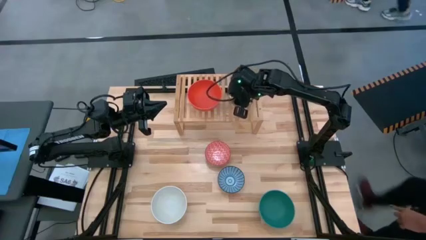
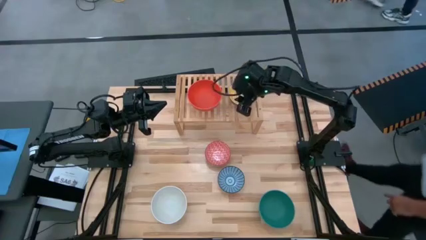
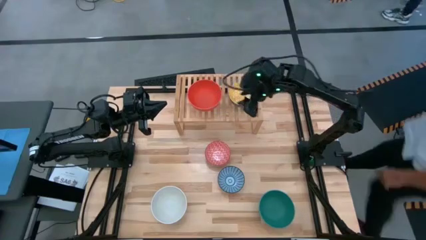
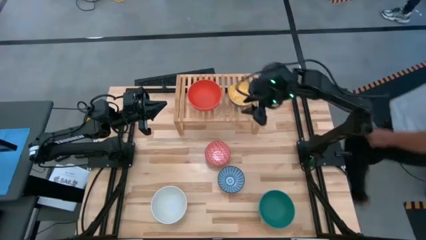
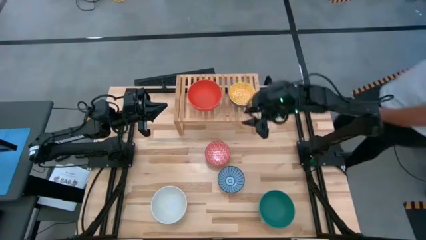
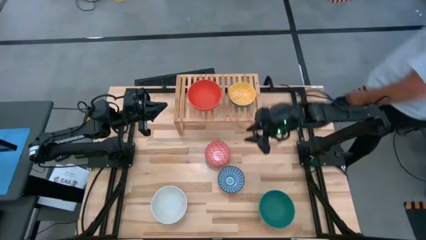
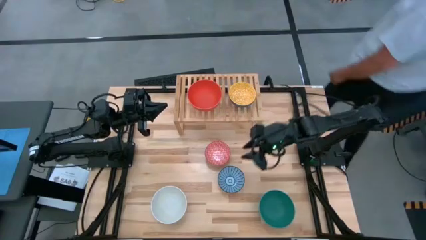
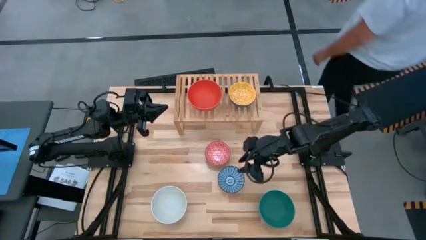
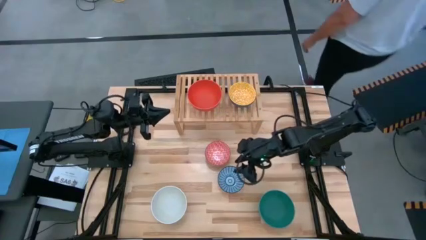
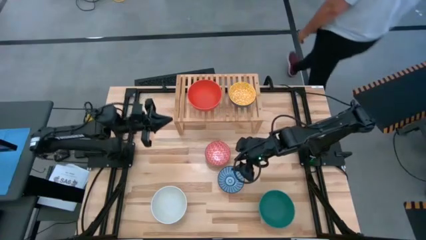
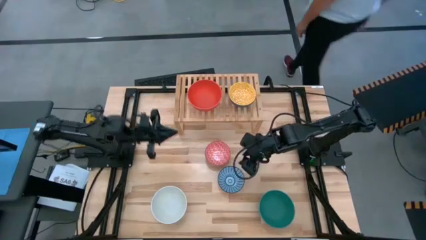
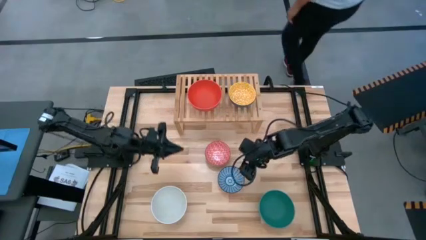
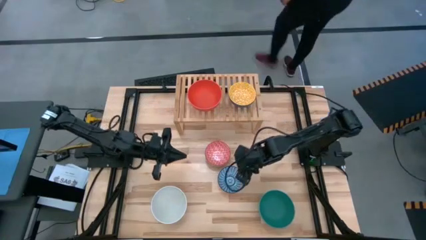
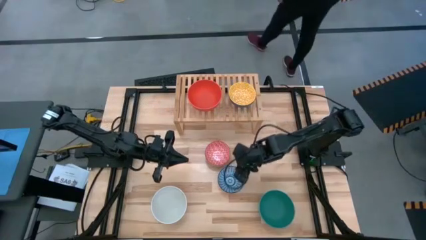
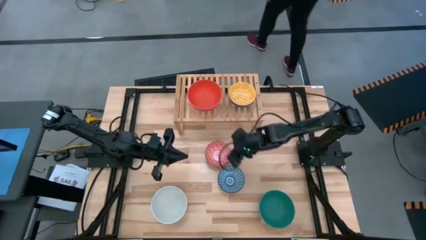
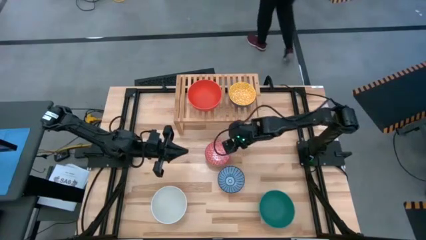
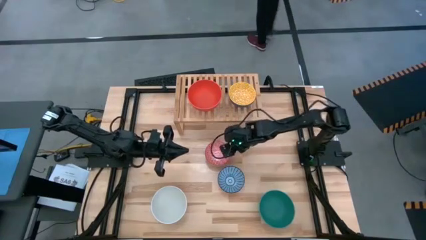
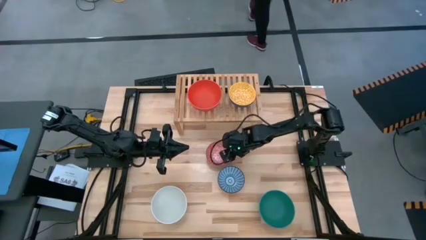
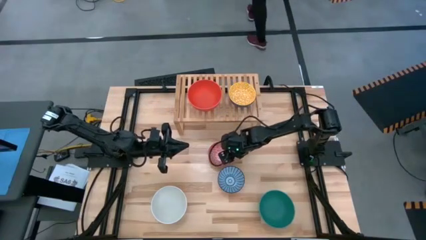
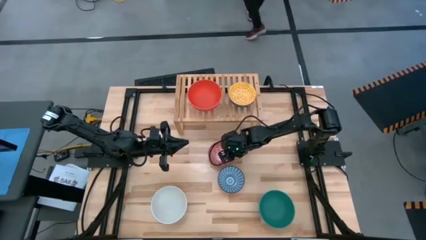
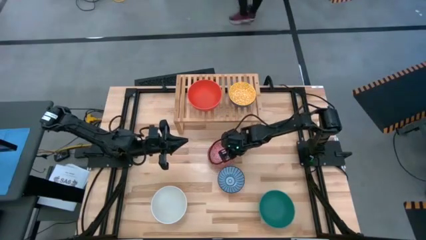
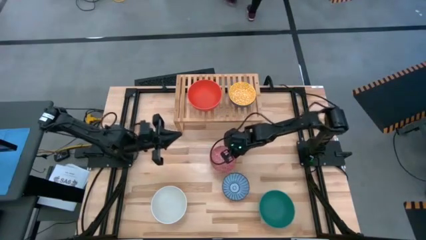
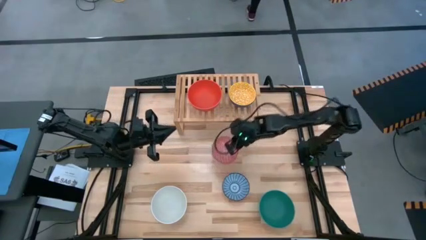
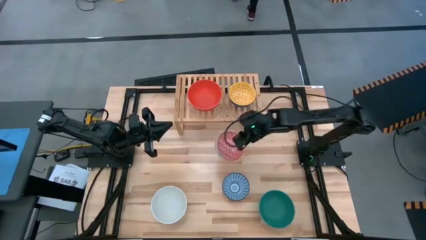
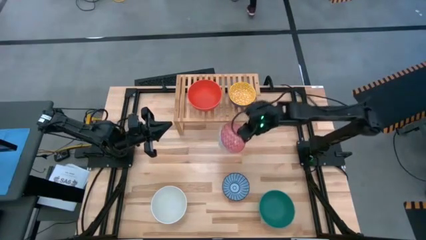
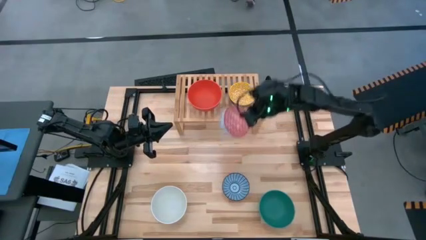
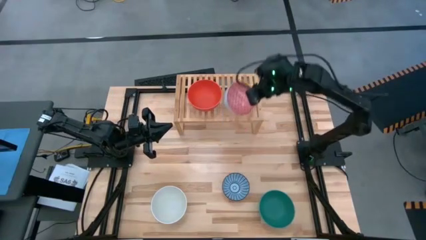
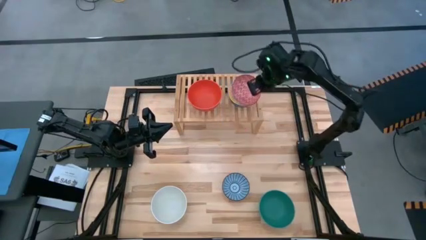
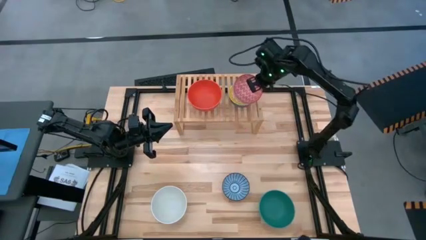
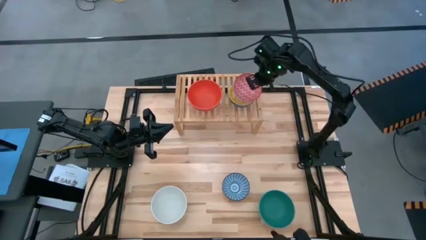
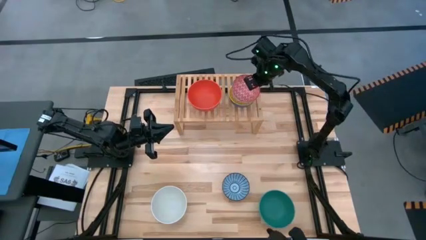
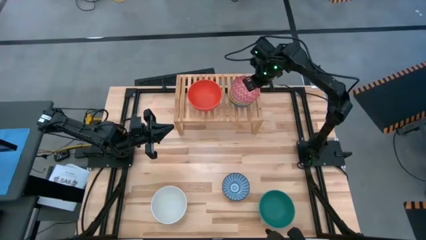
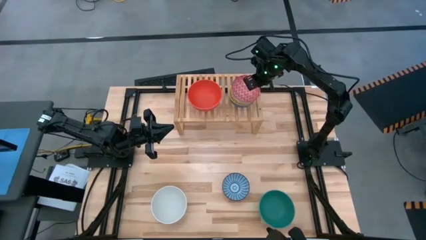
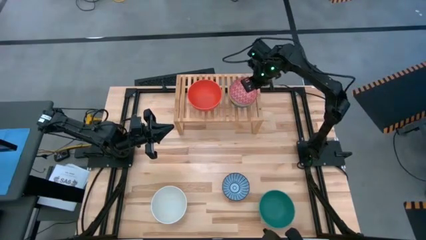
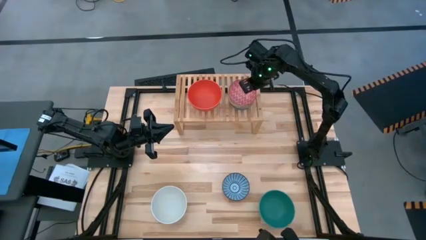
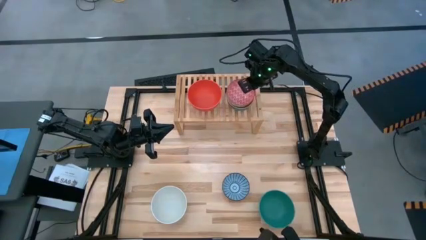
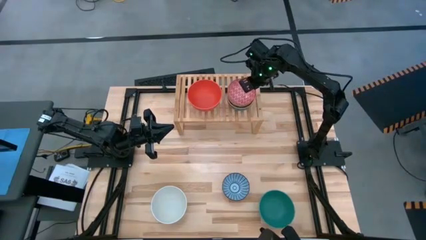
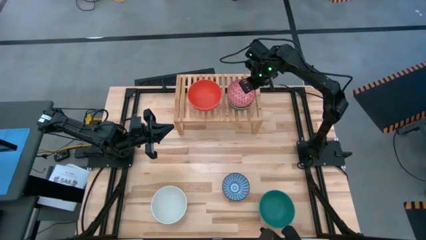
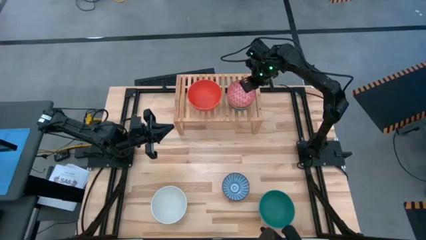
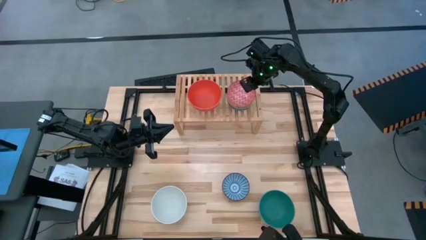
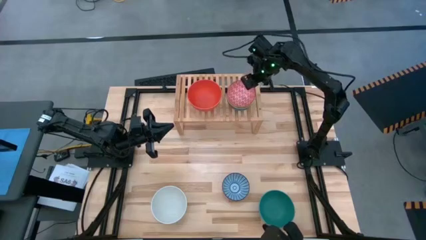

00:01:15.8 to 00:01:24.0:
Task: Place and stack bowls onto a shelf
Stack the small red bowl on top of the other small yellow bowl on the shelf

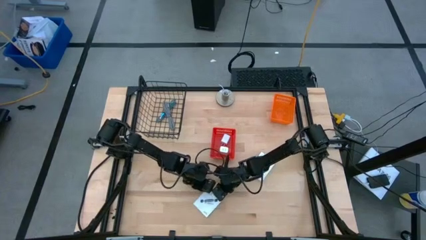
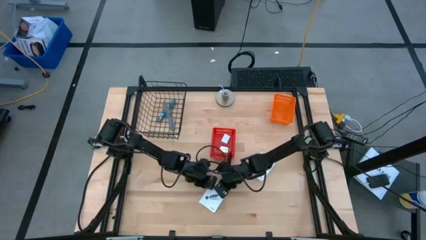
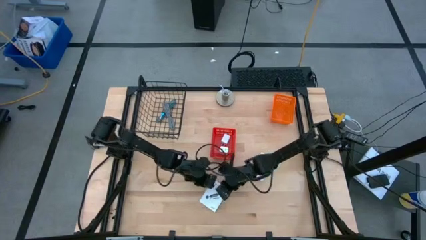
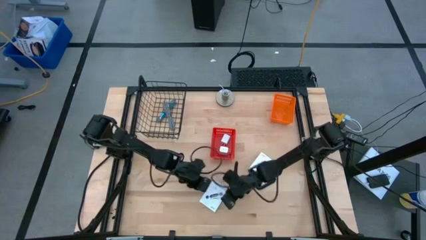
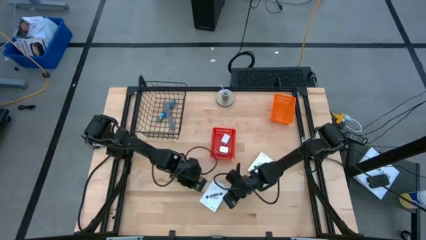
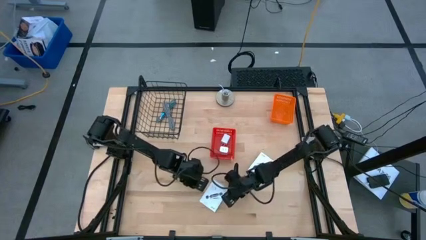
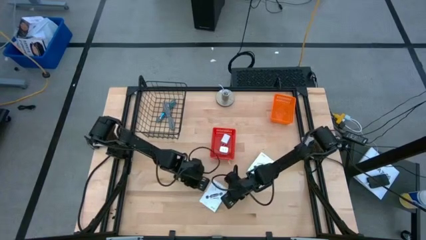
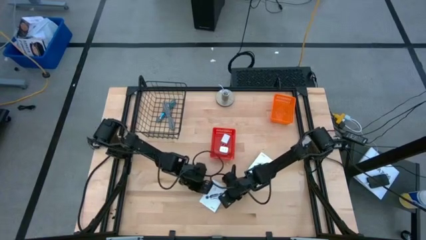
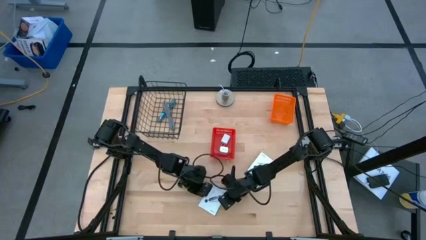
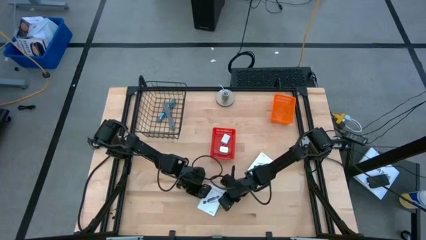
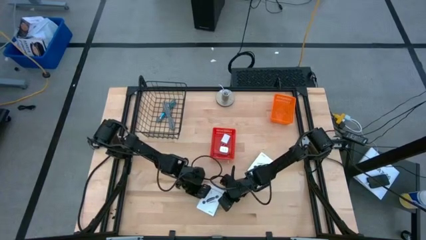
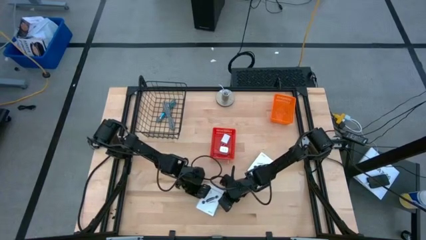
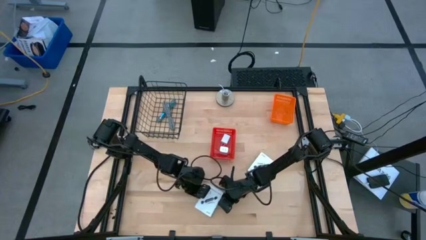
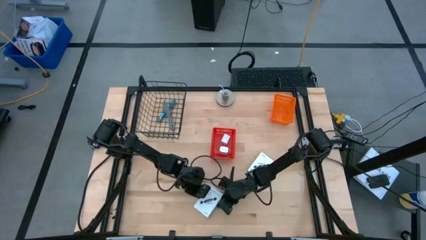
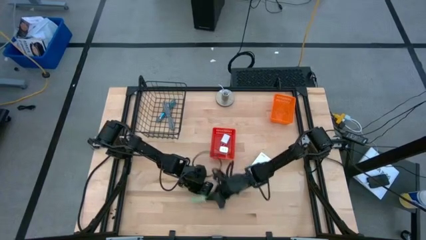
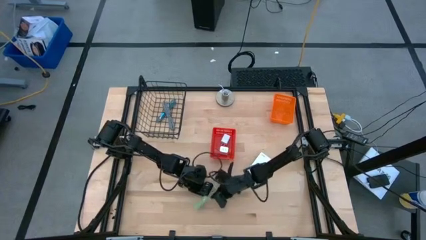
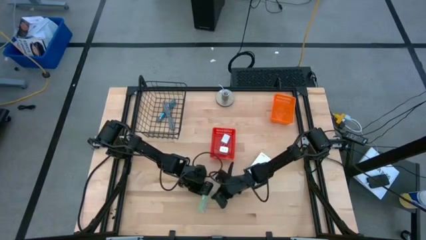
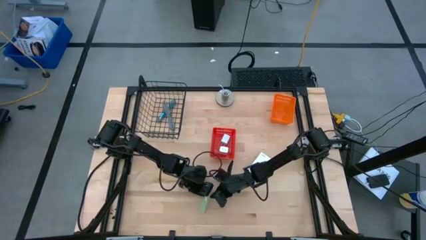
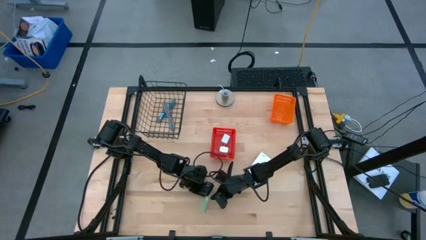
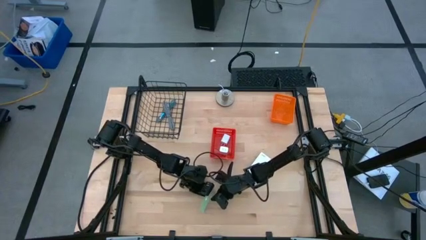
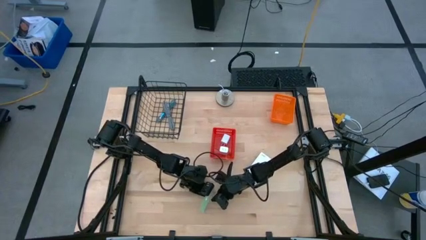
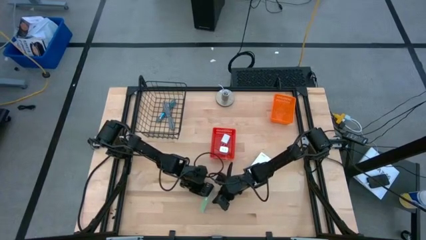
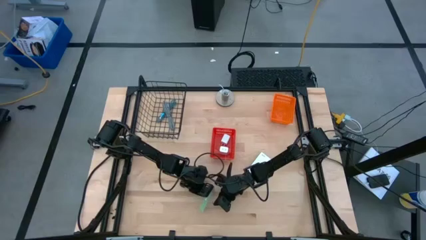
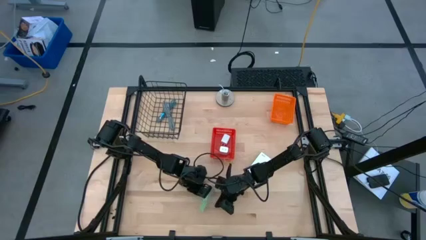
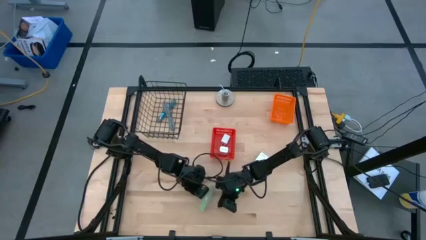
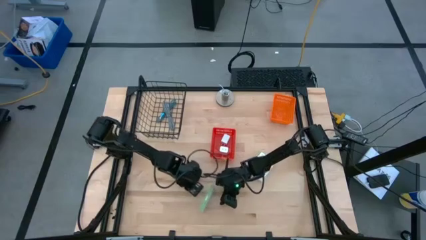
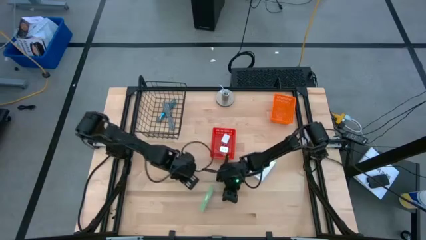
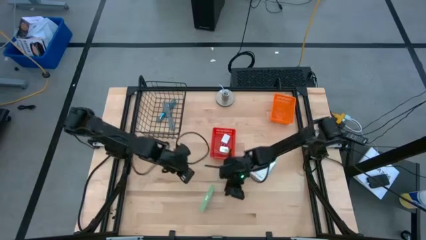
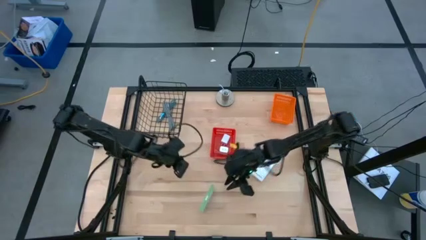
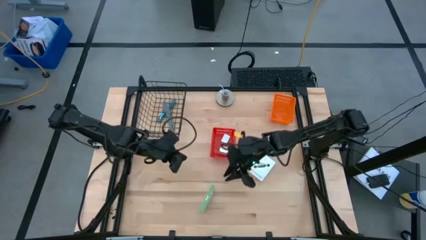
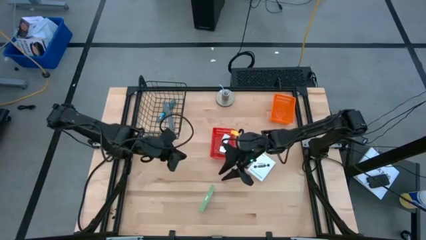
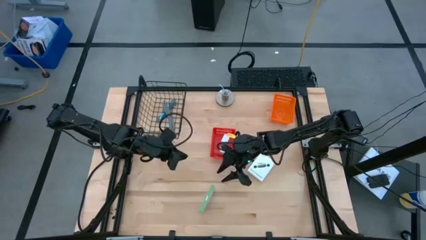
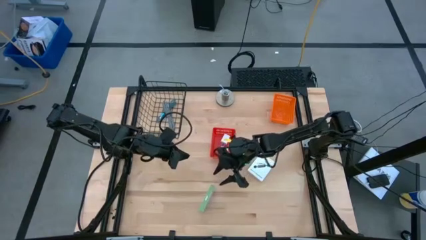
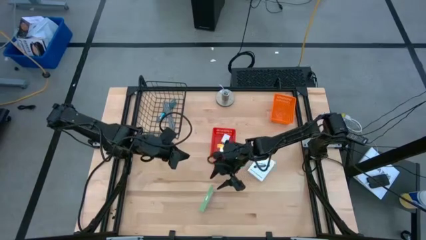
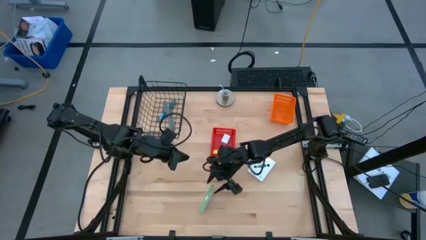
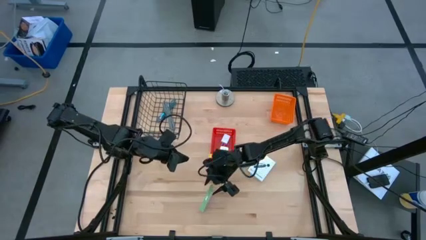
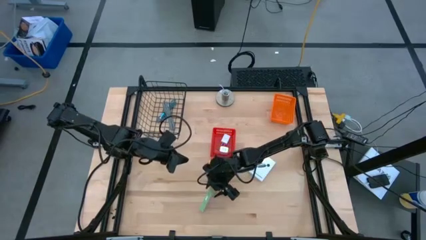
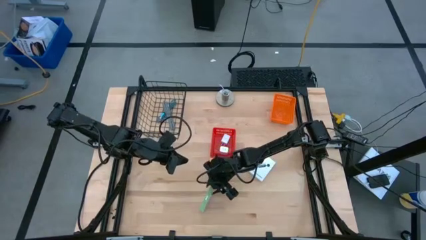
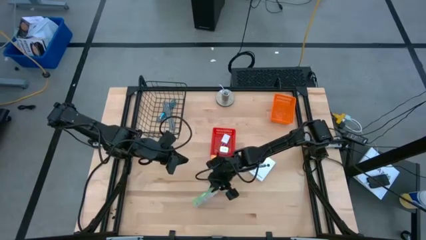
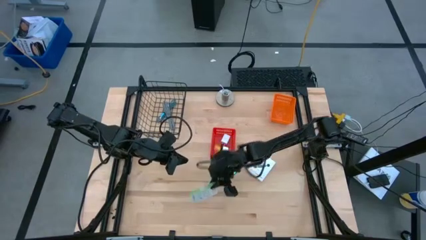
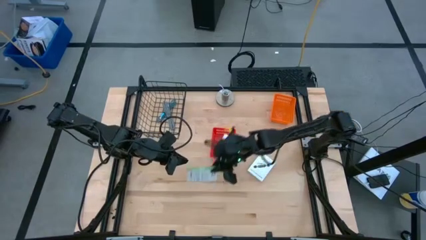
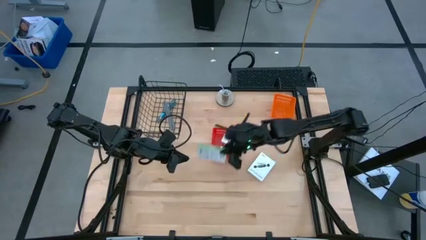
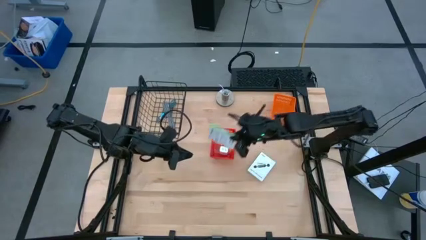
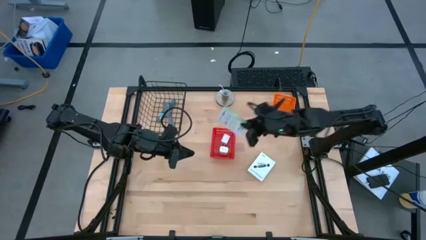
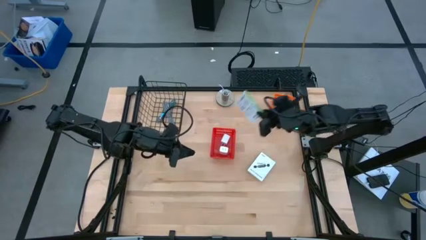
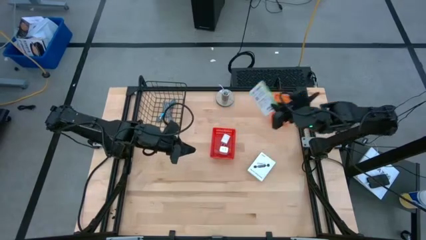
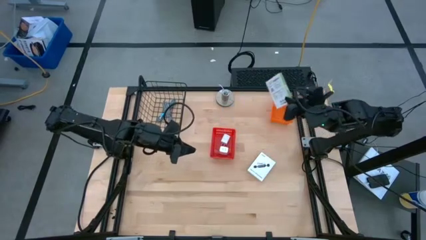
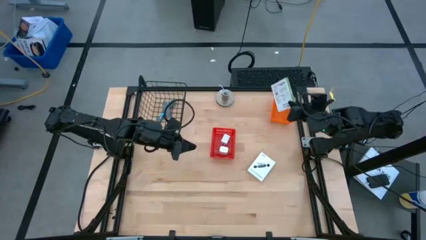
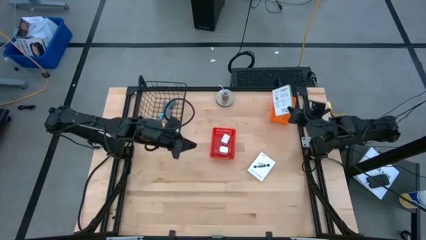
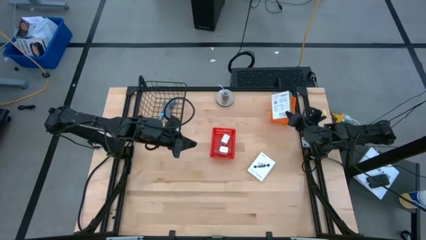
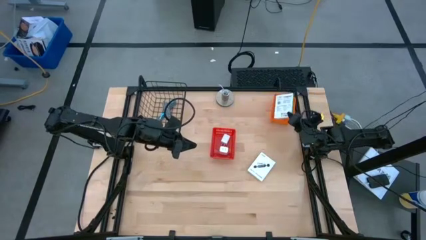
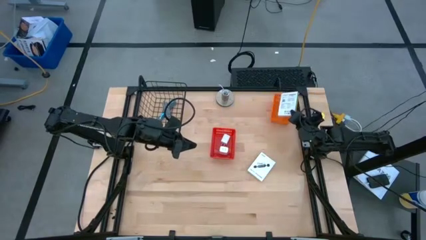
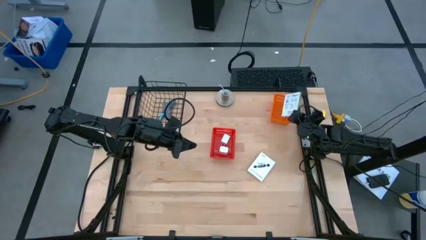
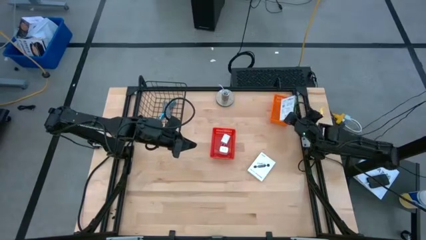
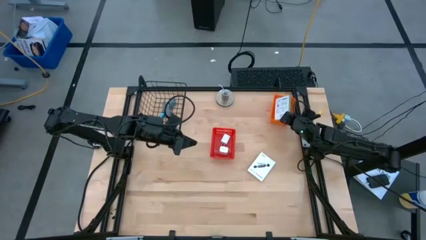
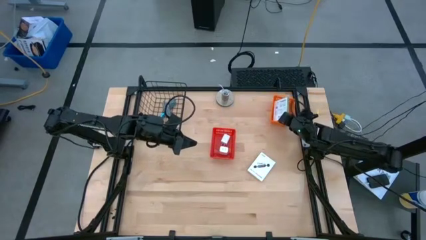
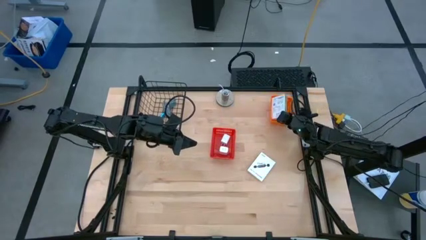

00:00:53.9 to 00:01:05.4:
Task: Pick and place items into bin
Put the left white card reader box into the orange bin
